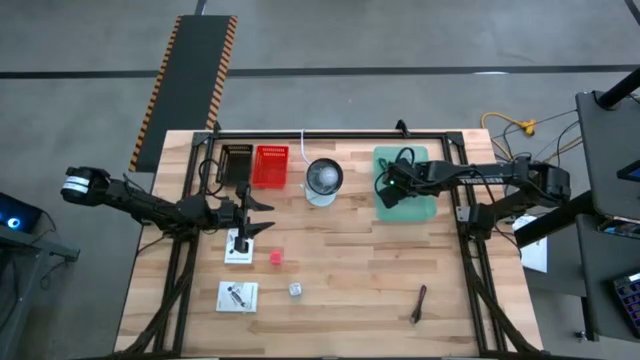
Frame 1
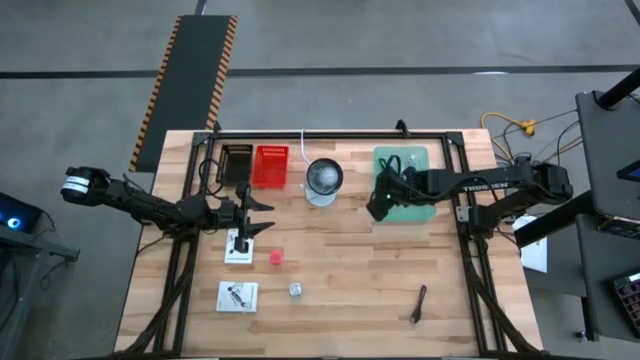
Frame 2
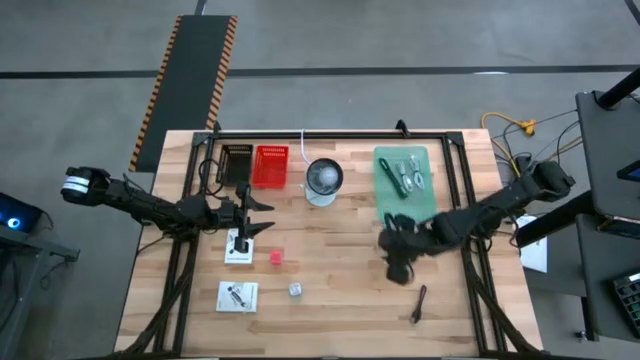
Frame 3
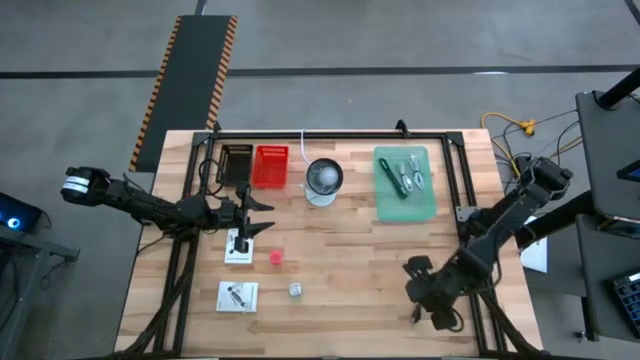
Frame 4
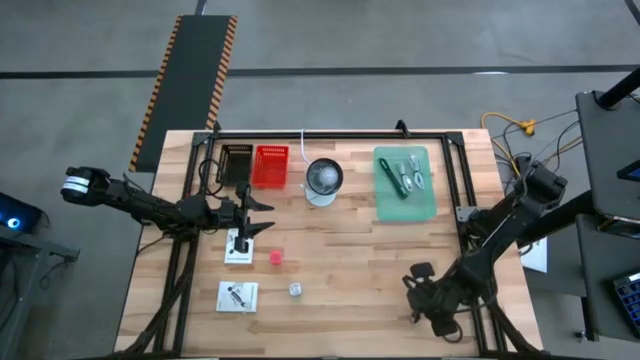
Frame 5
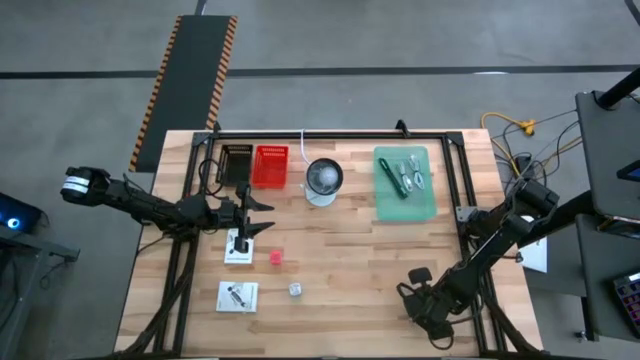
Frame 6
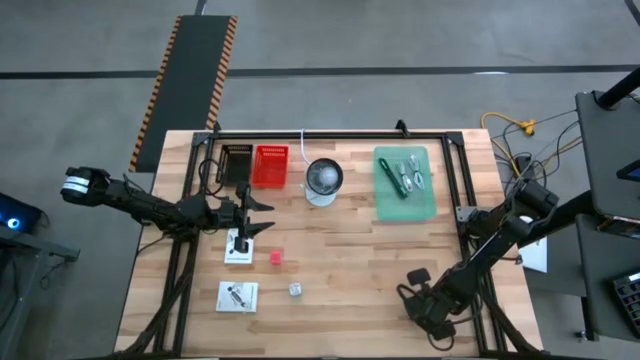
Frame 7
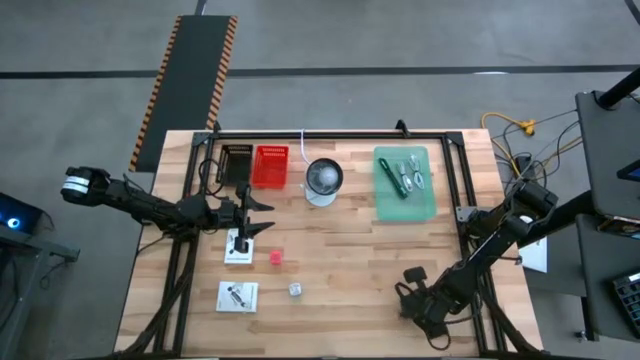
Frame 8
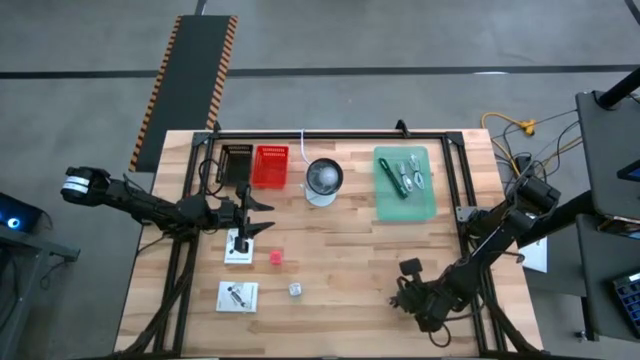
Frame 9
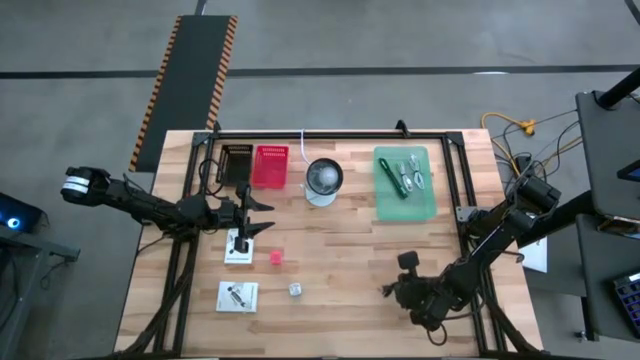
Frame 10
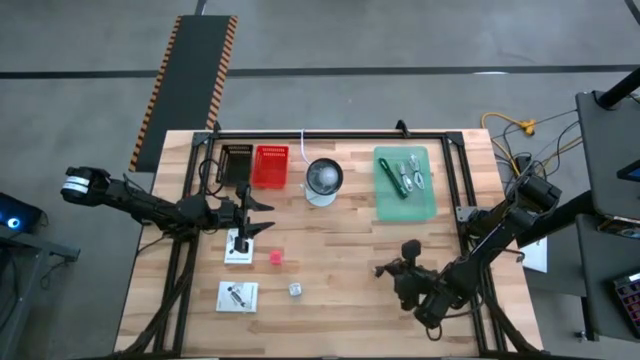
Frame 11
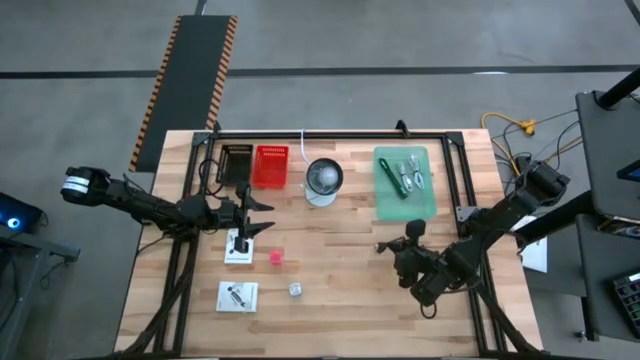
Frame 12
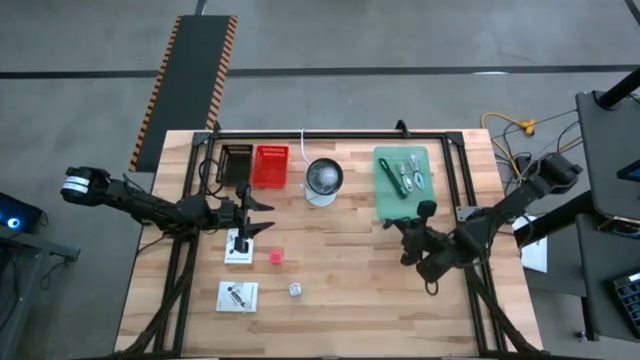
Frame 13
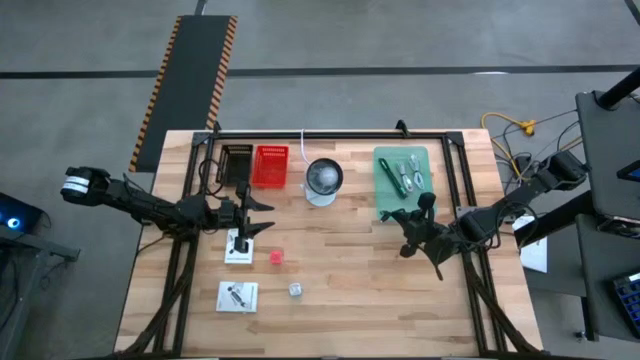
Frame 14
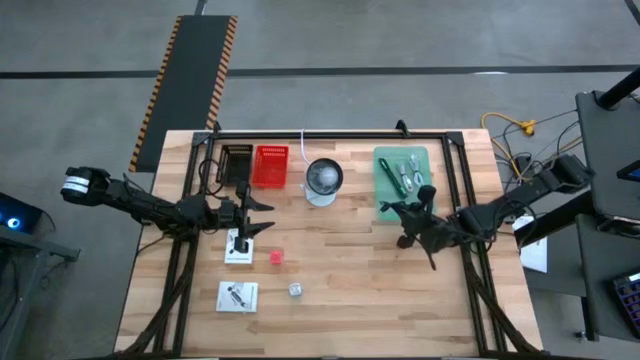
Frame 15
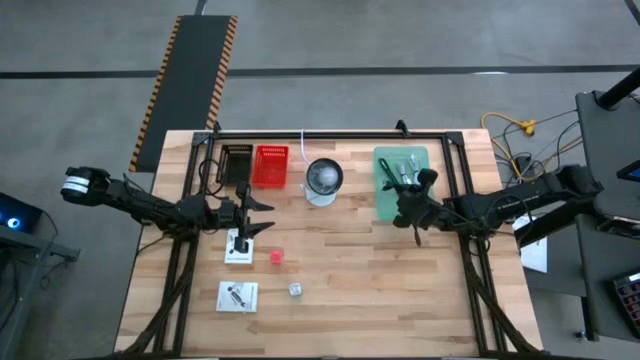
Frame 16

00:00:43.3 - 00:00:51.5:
Task: Pick and place items into bin
Put the black charger cable into the green bin

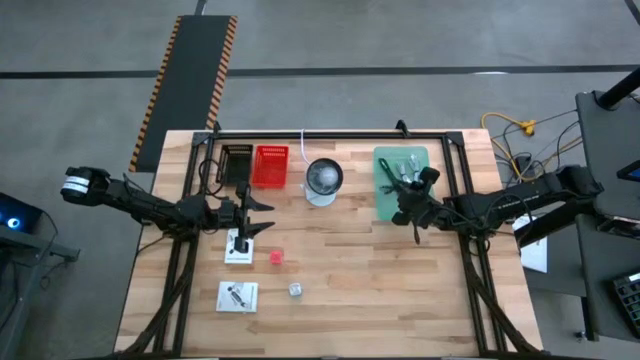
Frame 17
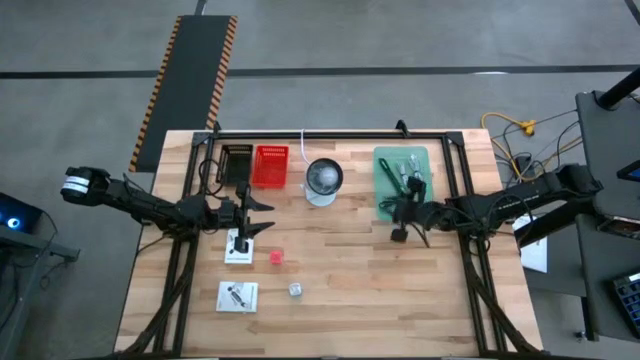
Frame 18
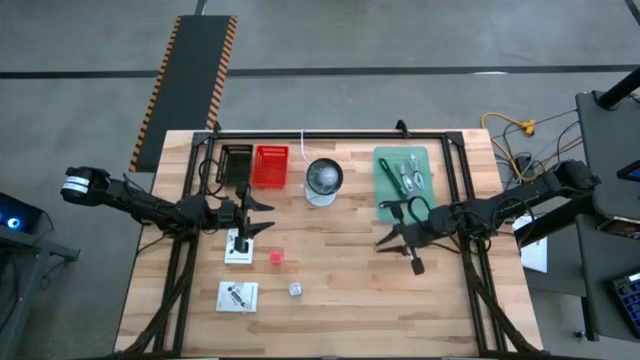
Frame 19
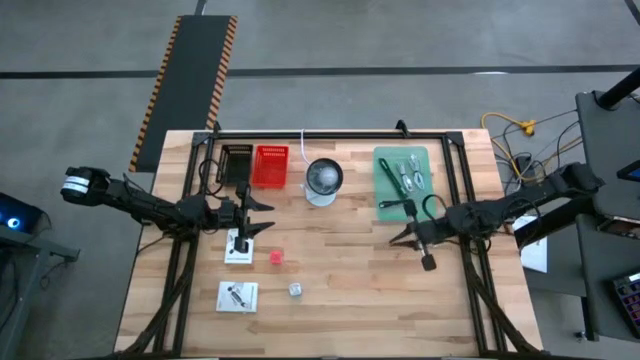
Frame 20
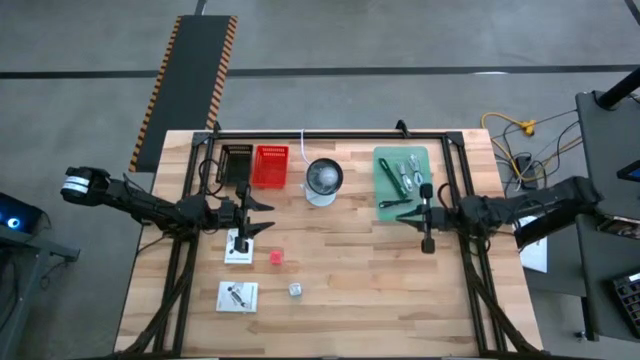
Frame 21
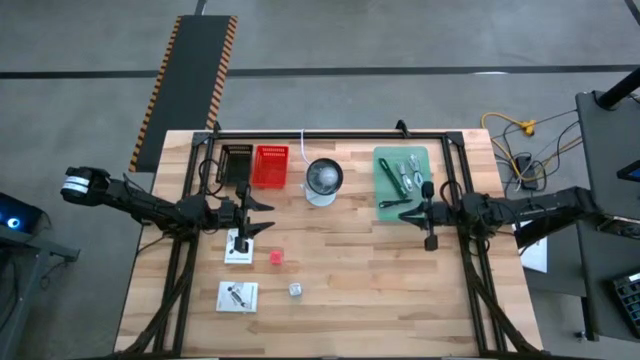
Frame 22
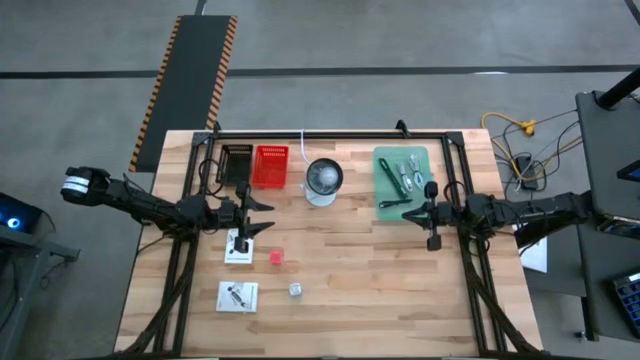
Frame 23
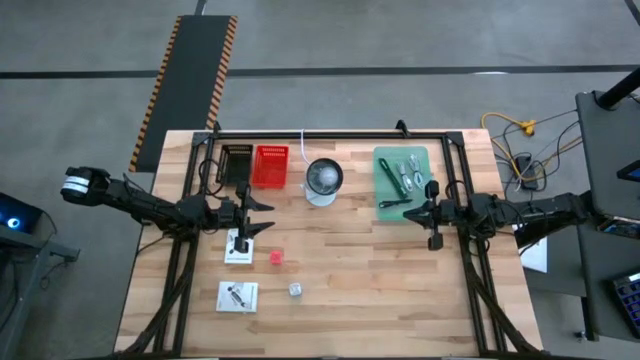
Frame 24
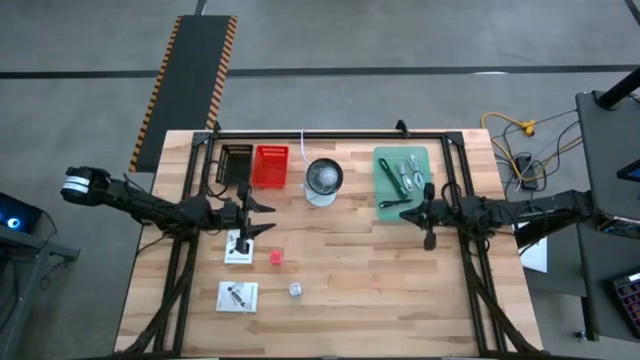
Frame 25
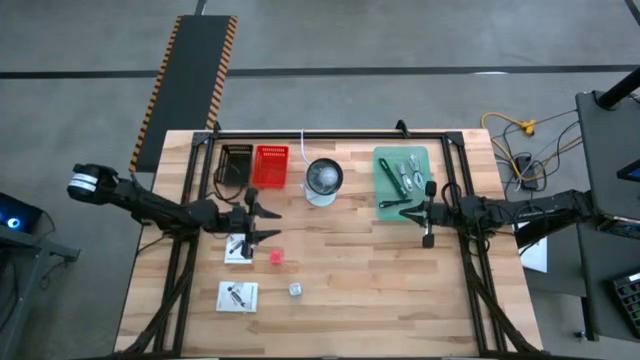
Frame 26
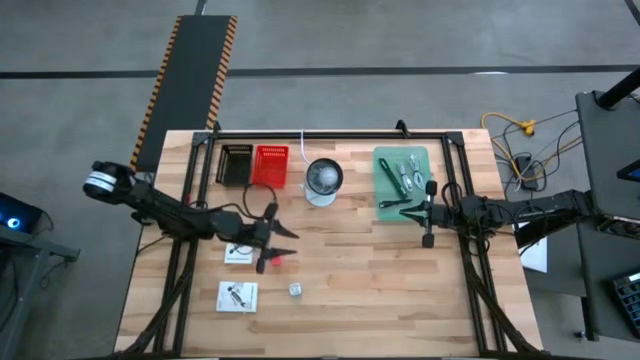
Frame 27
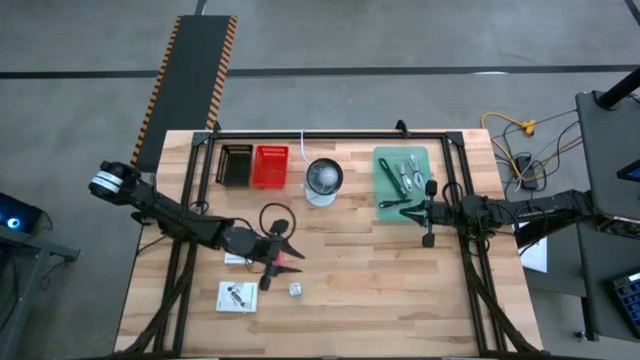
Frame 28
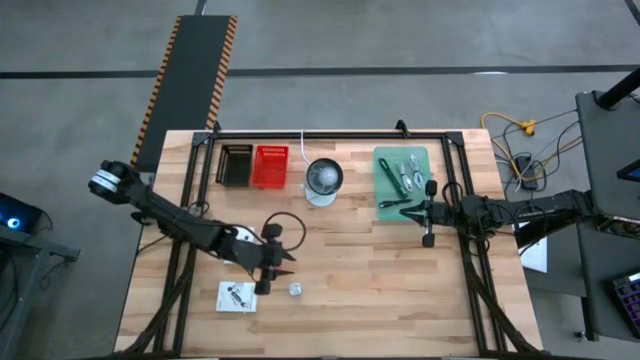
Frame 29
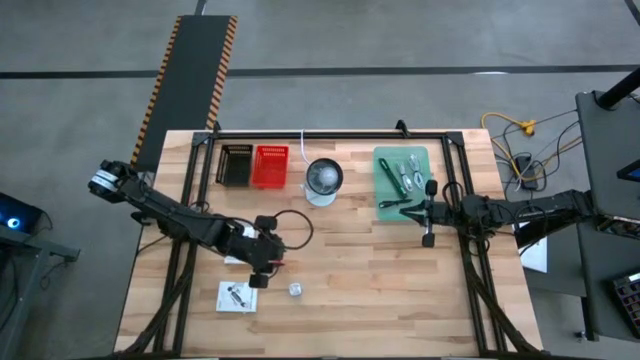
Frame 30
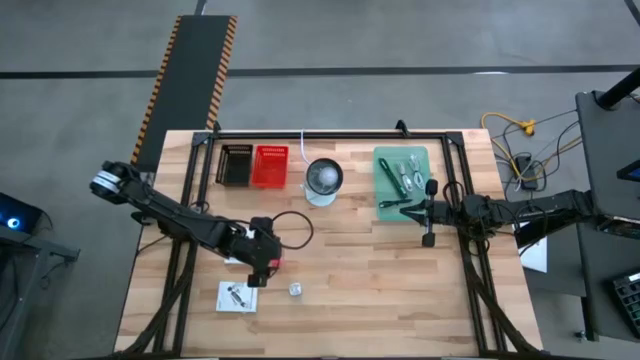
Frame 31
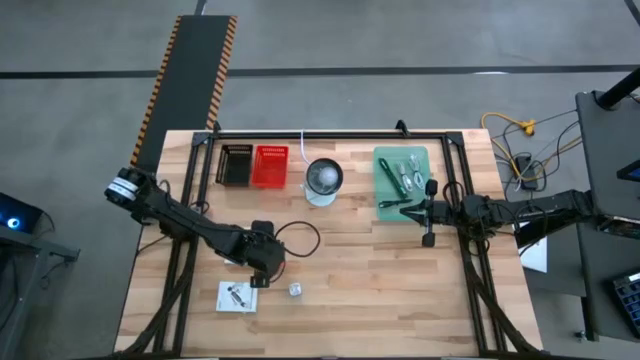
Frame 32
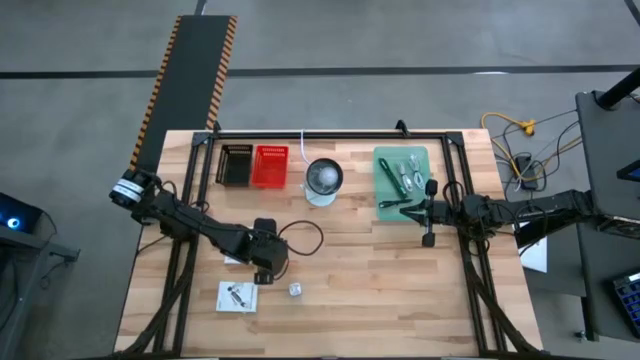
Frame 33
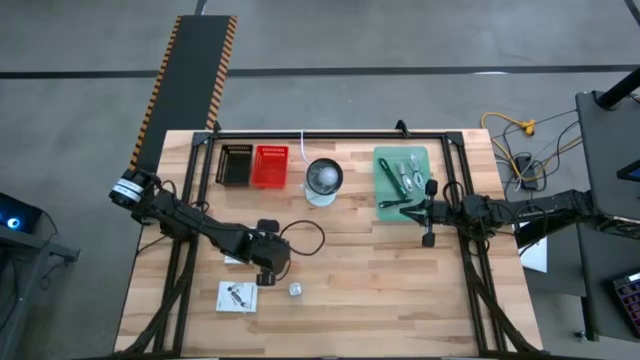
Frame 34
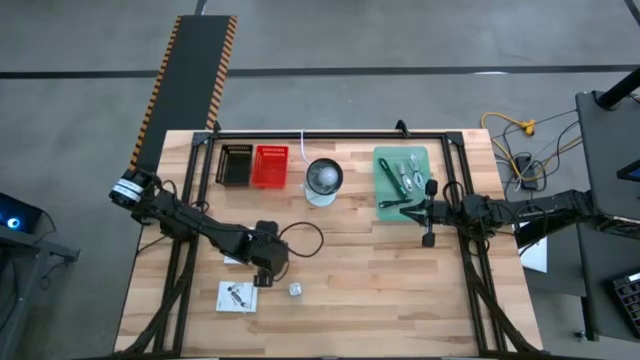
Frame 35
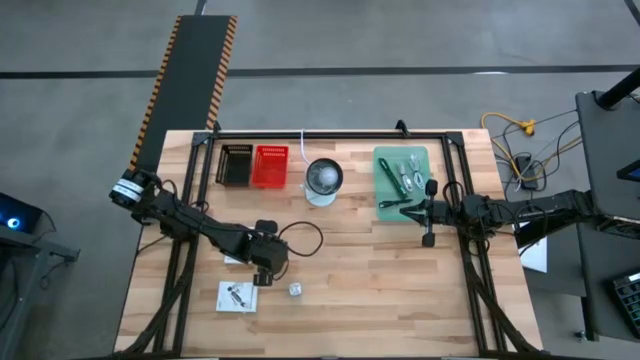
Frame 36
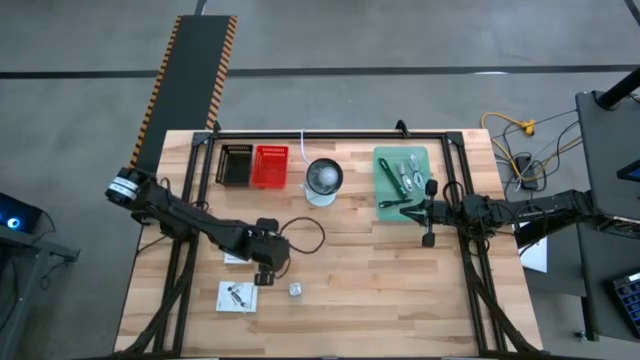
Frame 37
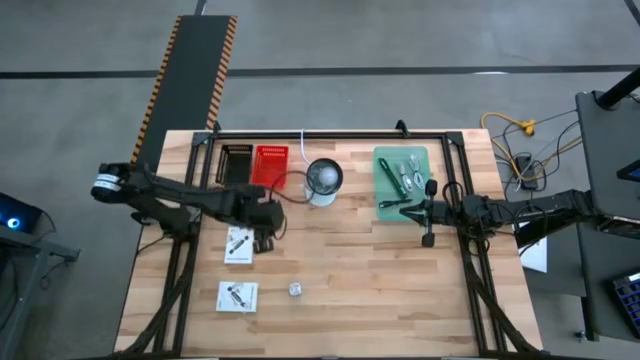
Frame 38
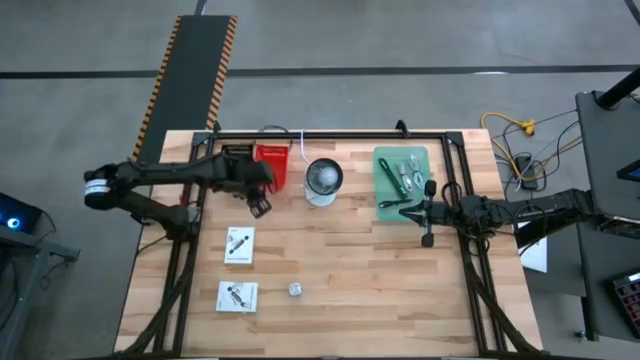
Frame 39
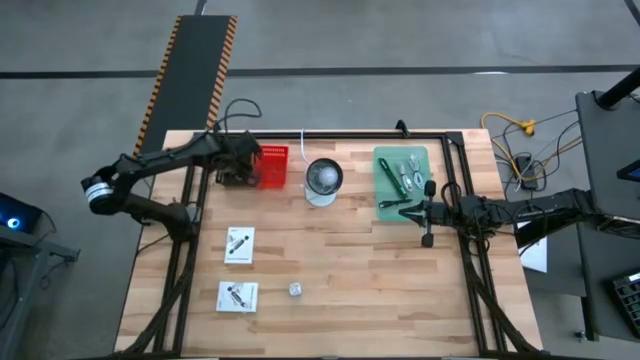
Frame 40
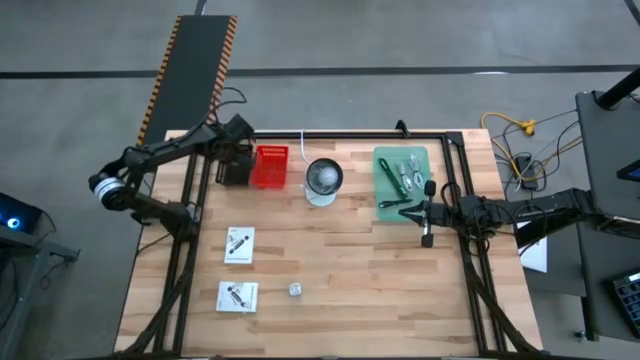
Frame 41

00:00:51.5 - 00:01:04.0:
Put the pink charger adapter into the black bin
